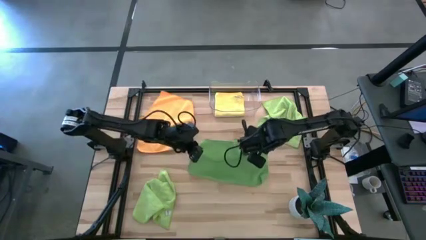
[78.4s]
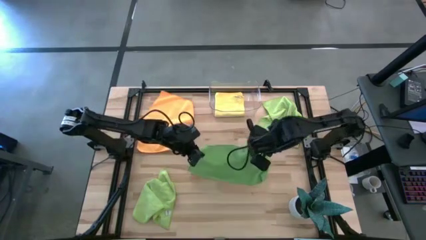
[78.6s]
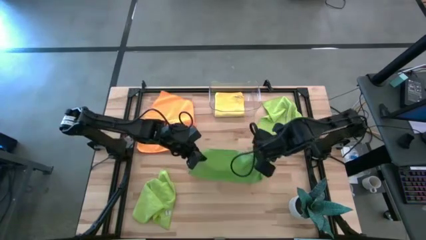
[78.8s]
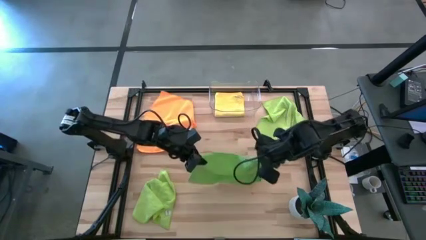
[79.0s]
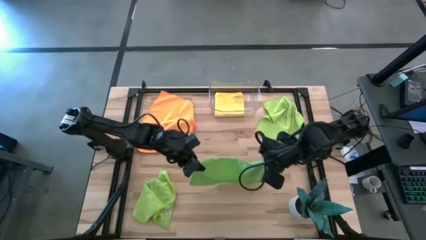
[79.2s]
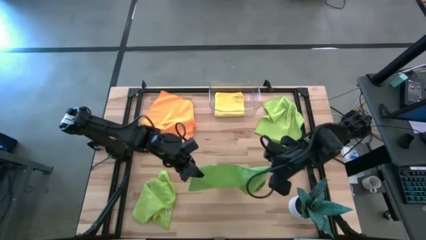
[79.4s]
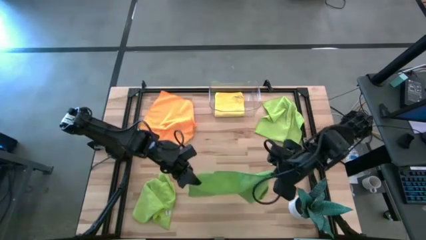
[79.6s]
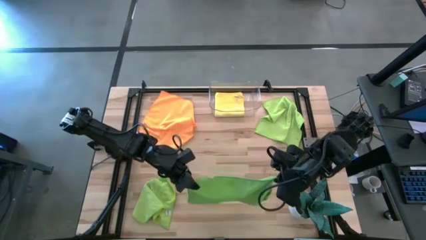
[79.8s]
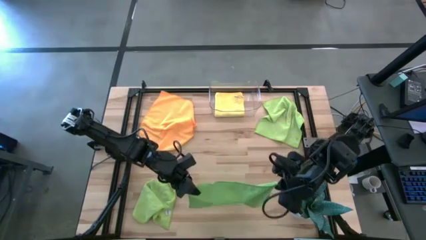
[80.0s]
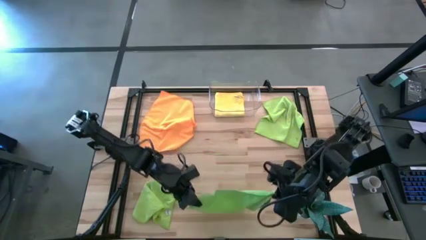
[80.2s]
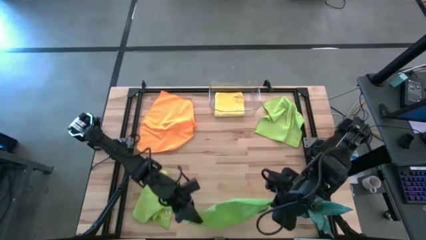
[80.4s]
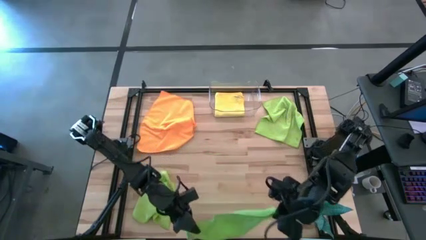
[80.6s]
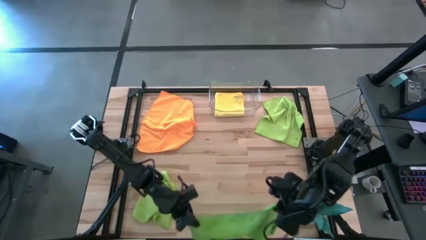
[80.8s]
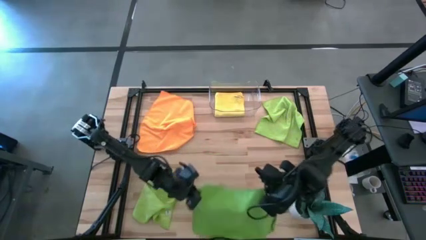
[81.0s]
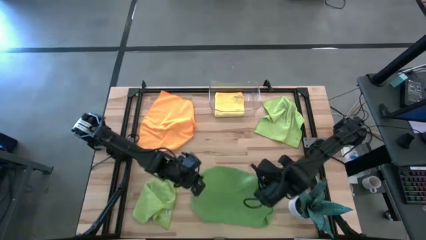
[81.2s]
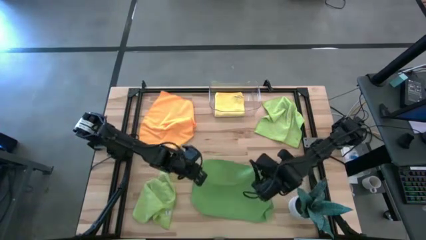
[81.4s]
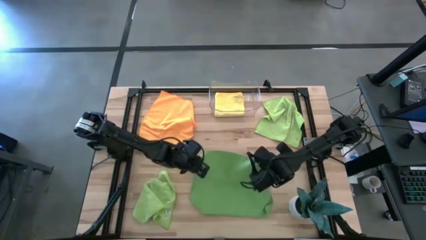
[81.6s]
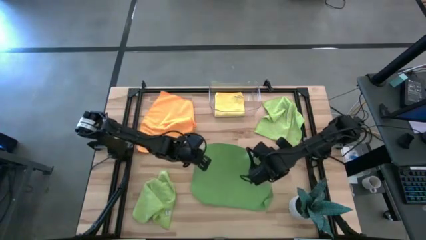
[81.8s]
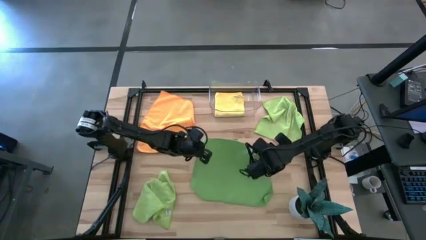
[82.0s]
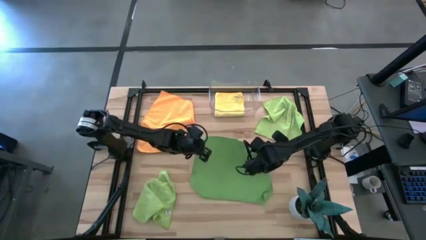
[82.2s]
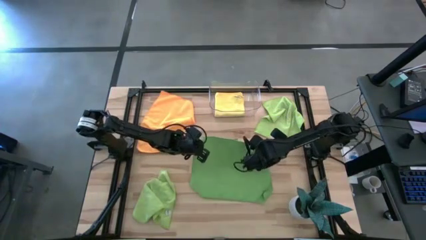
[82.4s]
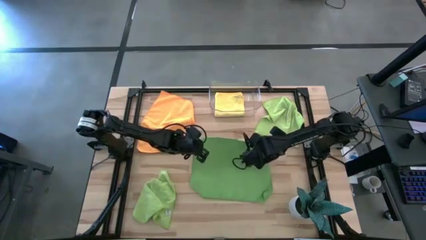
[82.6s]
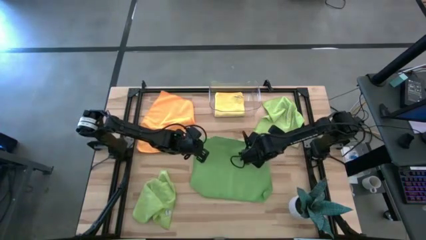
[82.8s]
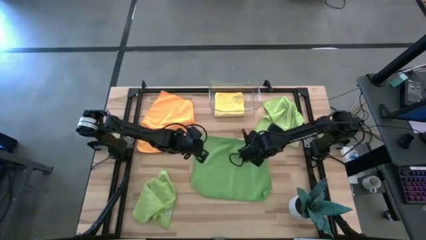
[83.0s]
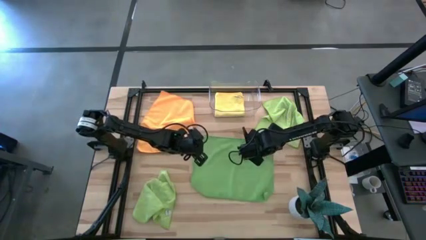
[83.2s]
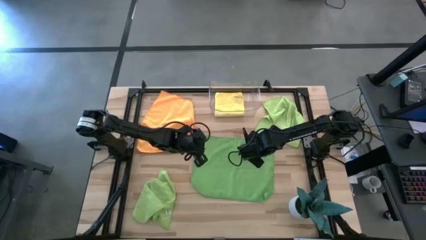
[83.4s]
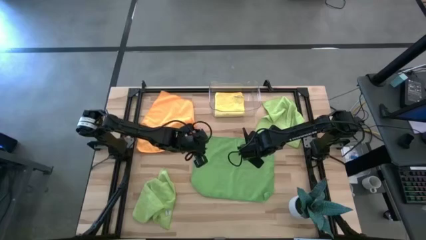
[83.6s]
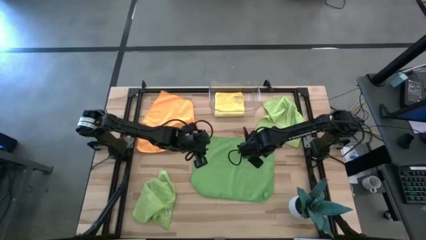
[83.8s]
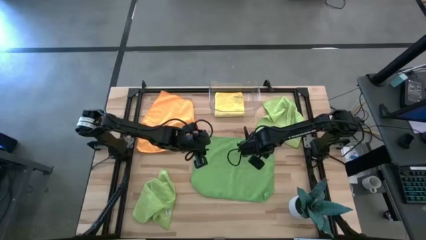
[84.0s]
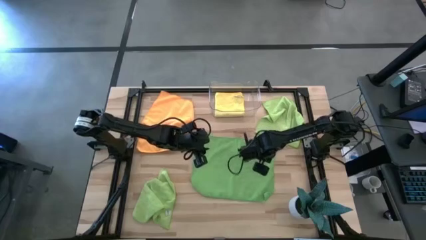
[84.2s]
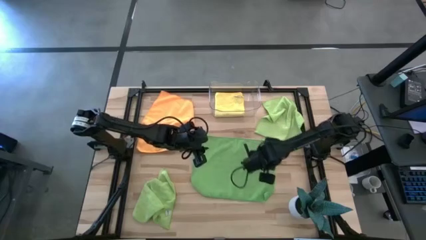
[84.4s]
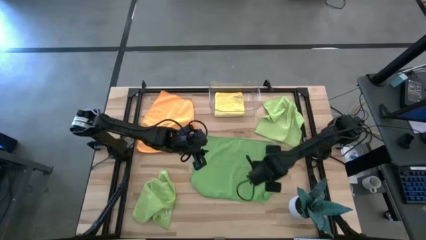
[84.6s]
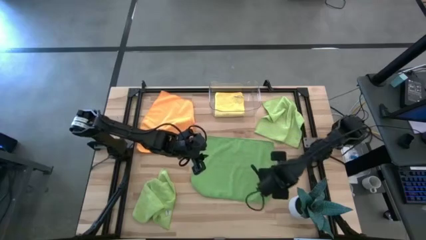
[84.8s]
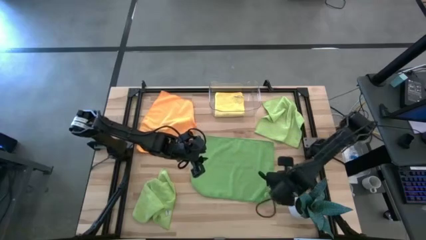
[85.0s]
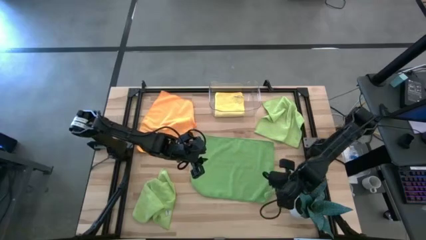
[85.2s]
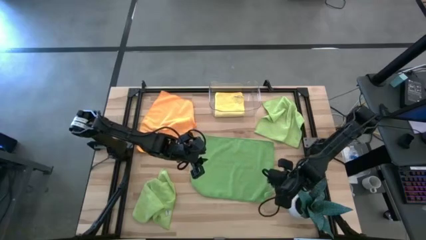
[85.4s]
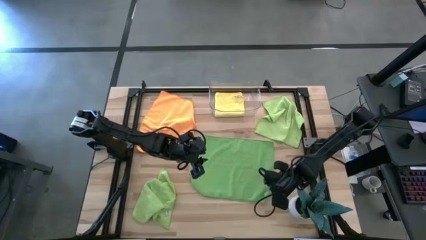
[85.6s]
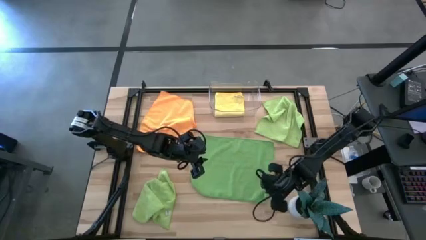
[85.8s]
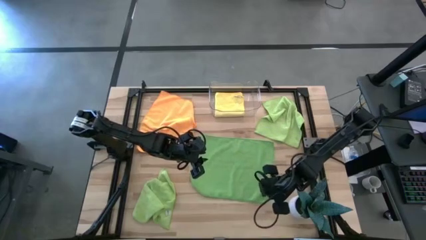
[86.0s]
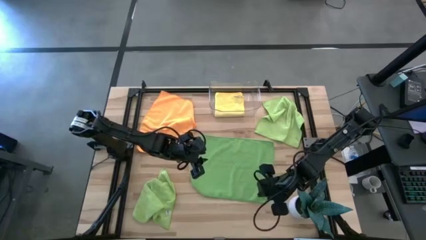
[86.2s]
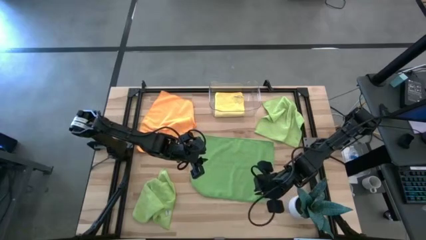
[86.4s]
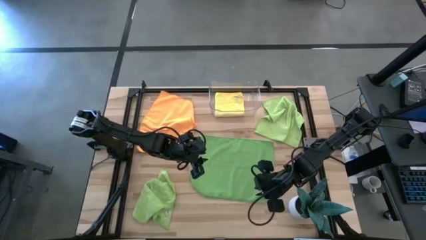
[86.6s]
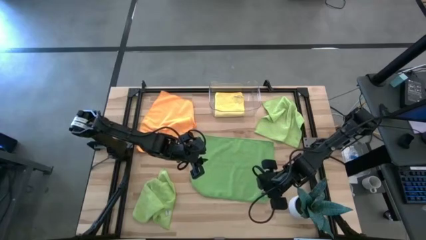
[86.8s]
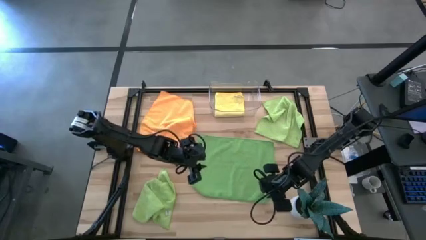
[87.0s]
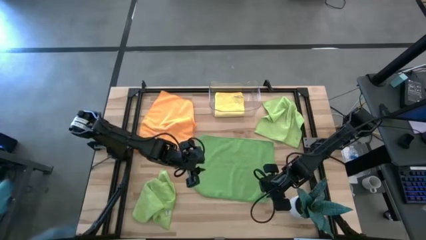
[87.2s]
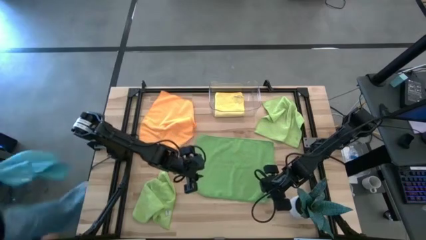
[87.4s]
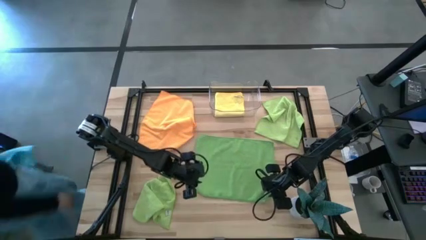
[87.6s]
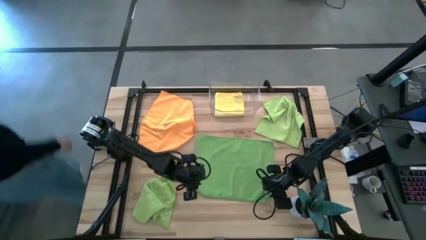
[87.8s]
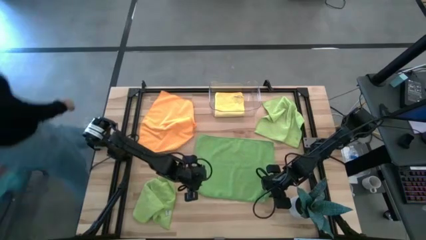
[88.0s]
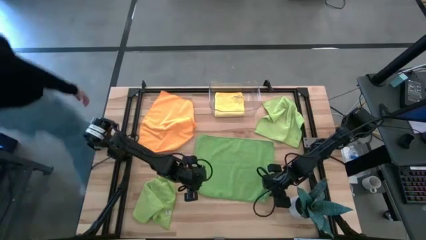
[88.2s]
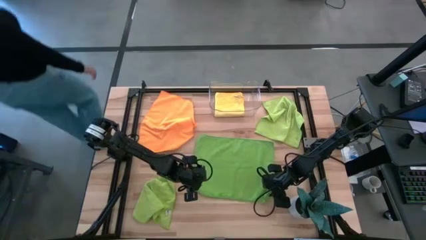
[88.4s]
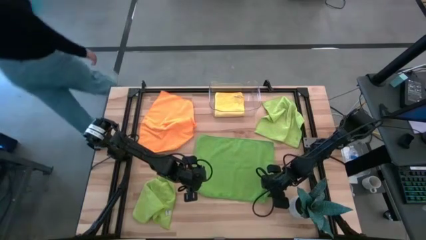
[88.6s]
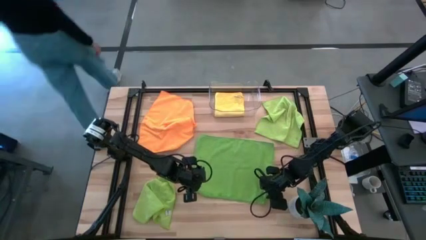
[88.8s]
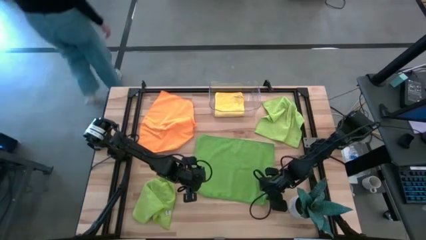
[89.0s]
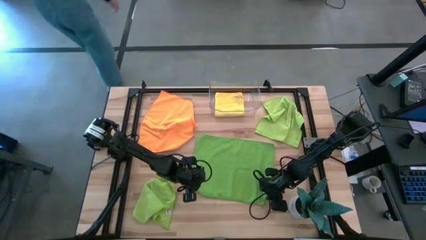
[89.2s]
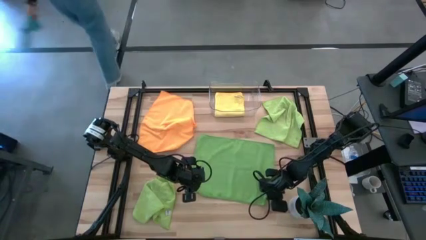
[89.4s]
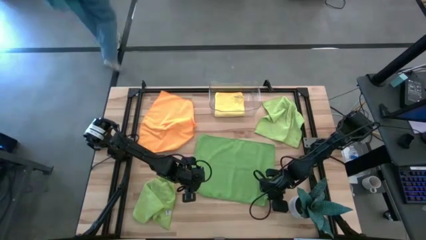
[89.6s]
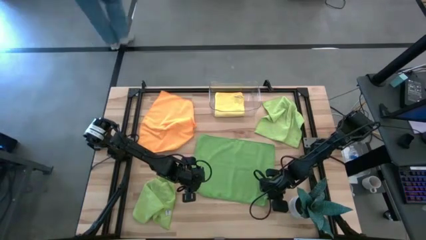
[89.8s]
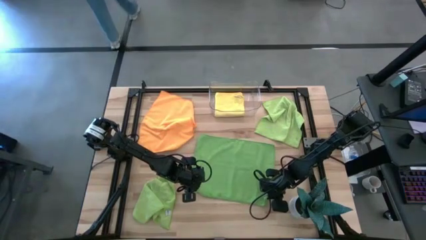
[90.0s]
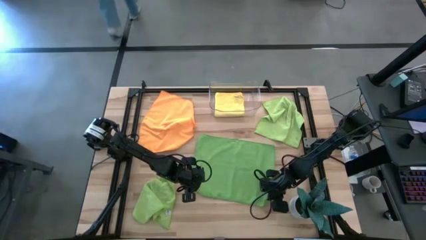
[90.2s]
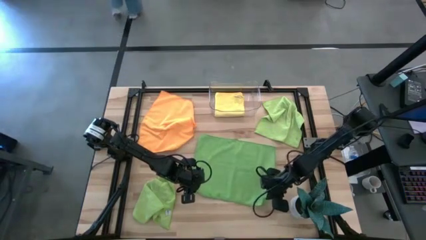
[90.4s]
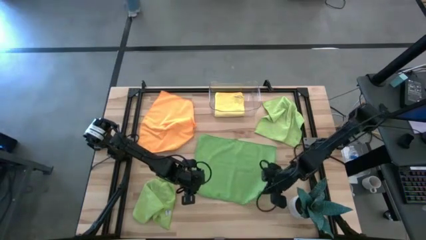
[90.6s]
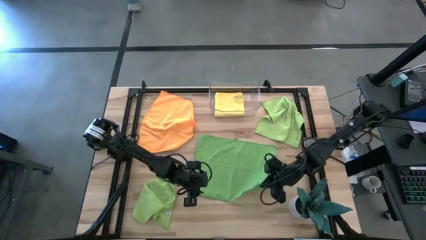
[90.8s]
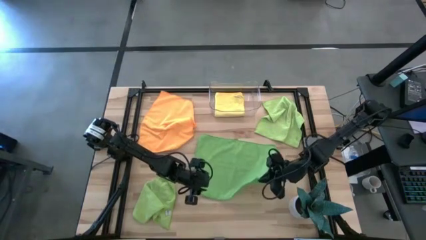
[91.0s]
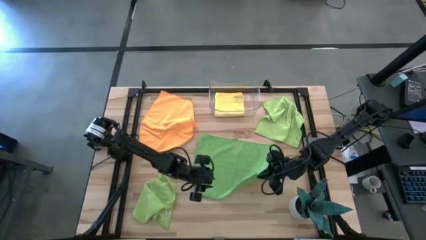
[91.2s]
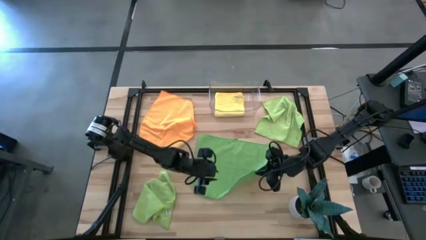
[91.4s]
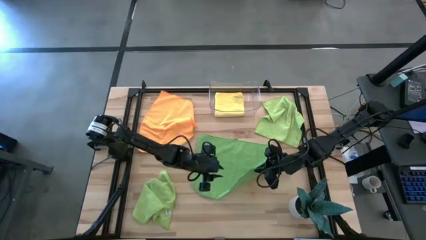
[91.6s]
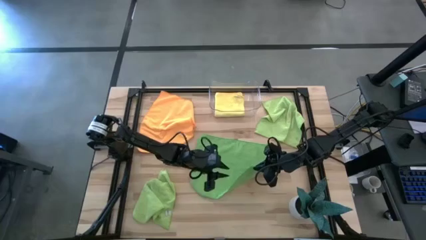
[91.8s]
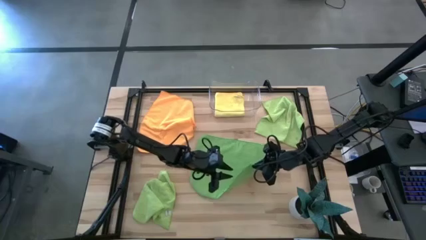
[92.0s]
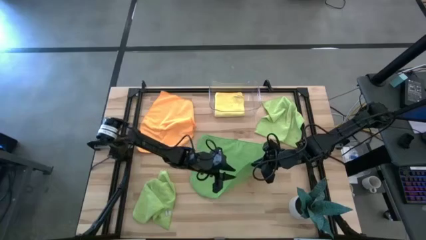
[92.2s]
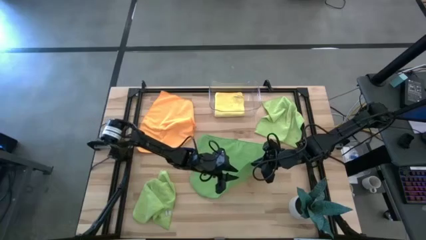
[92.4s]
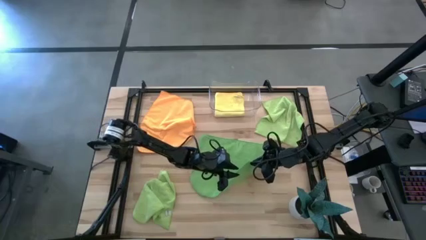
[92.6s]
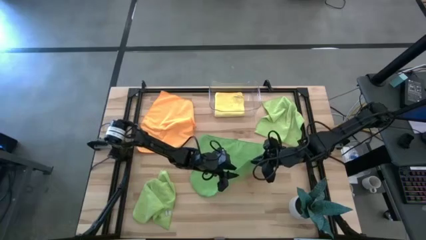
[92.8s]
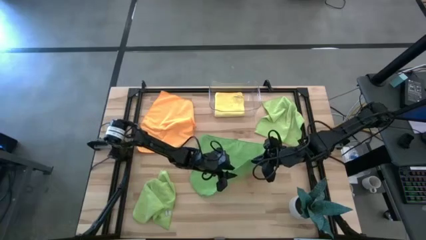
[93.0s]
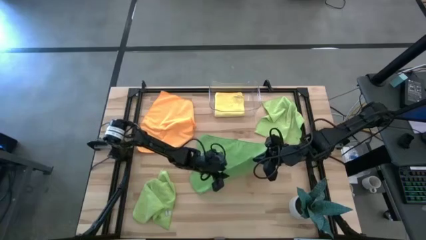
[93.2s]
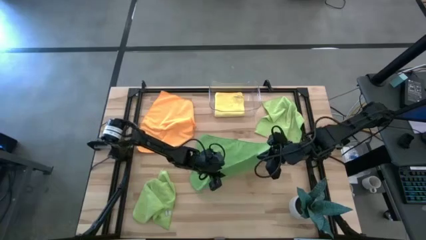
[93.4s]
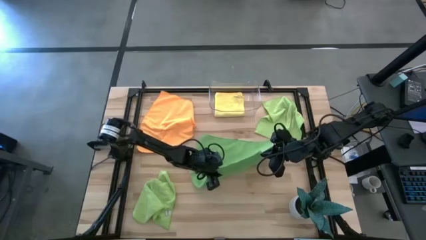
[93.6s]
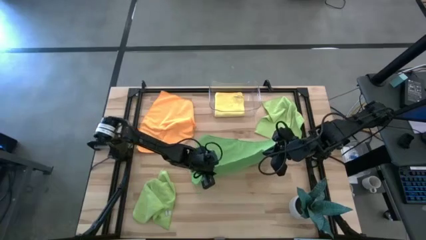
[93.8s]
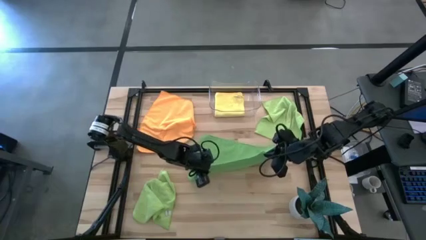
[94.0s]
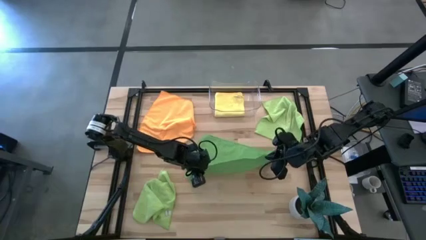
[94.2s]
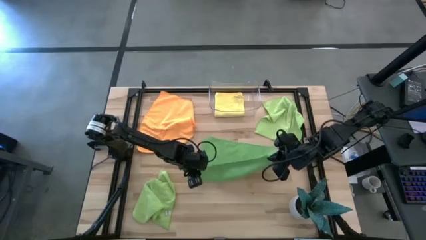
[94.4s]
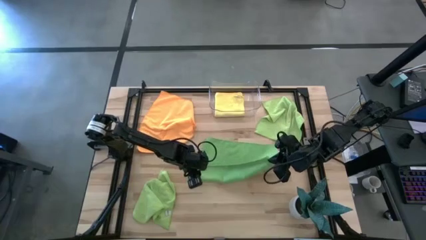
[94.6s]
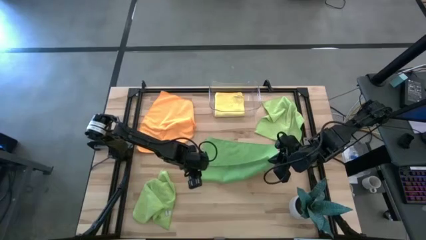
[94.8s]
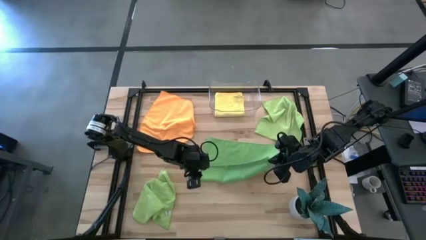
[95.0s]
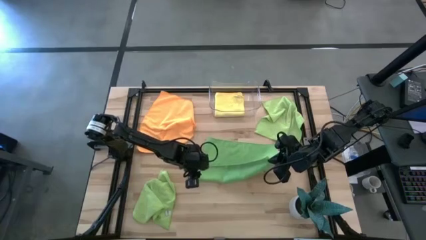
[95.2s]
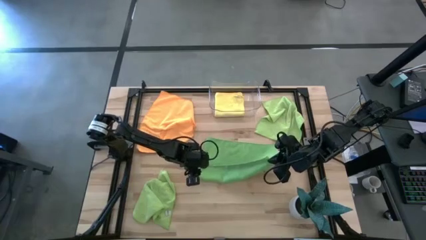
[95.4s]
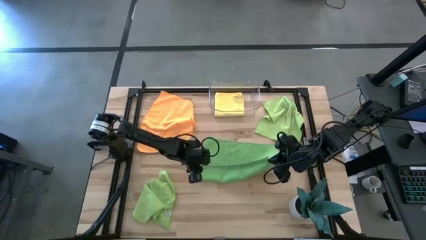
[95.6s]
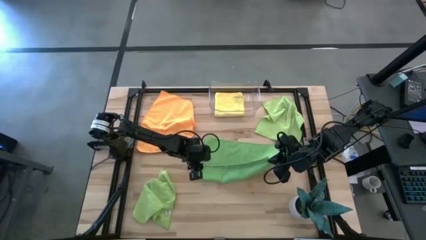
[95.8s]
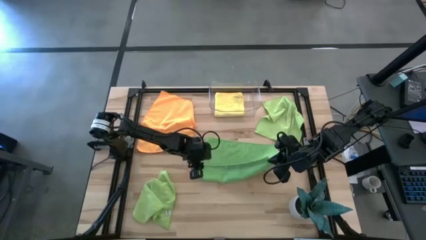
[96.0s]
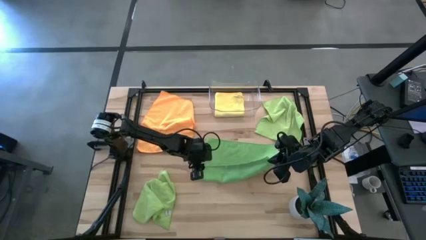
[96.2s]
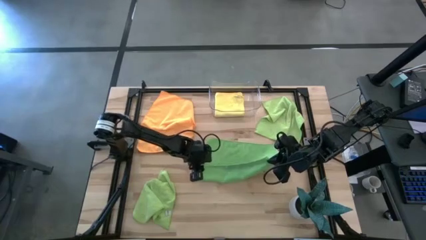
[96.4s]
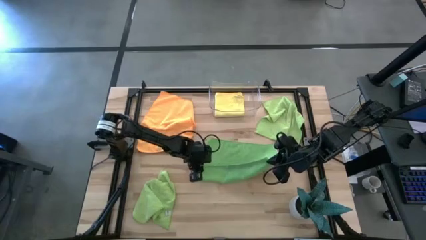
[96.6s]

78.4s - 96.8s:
Task: Fold microfiber towels
Fold the green microfiber cloth
